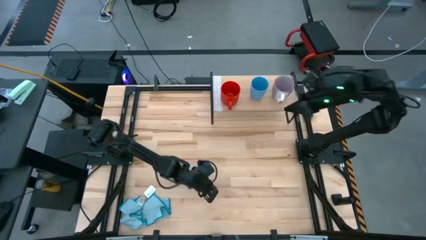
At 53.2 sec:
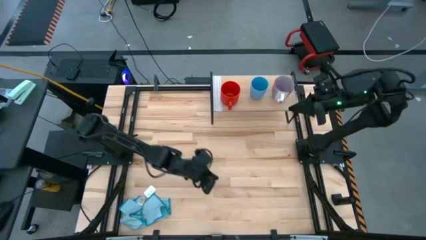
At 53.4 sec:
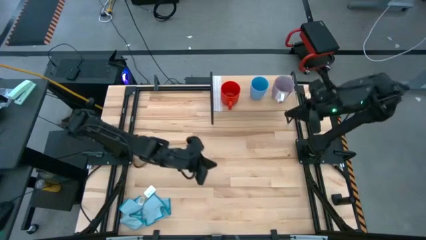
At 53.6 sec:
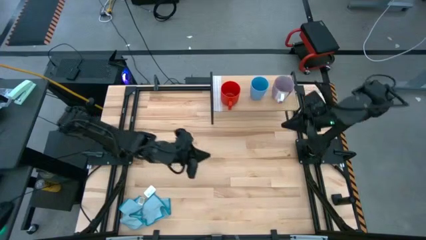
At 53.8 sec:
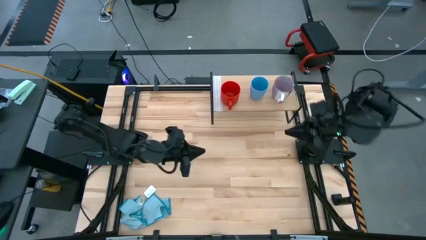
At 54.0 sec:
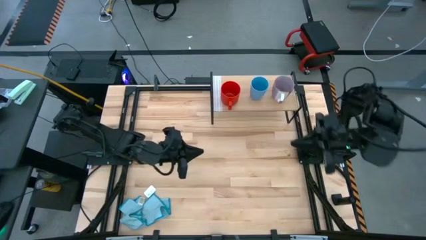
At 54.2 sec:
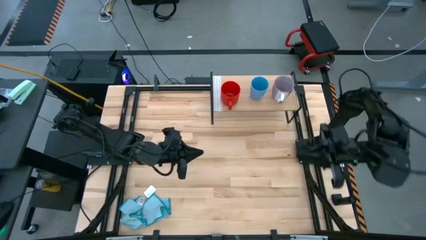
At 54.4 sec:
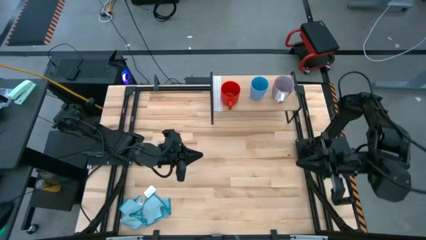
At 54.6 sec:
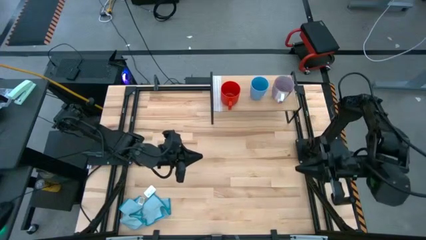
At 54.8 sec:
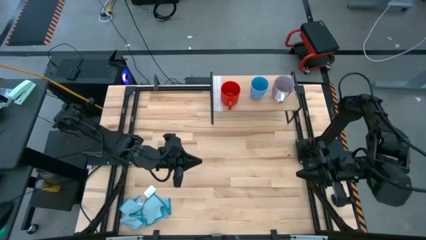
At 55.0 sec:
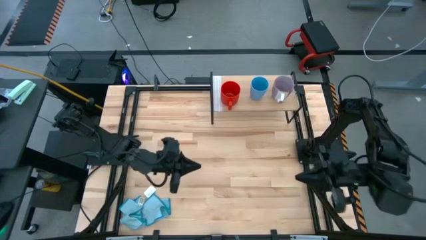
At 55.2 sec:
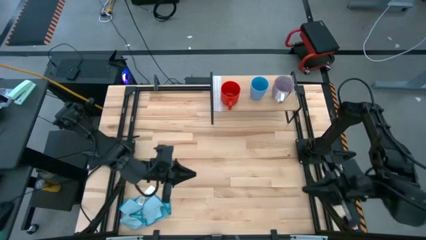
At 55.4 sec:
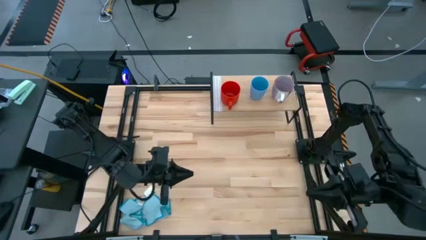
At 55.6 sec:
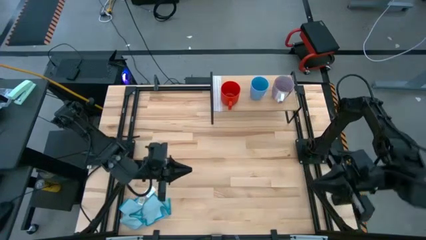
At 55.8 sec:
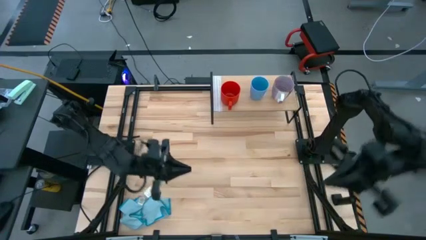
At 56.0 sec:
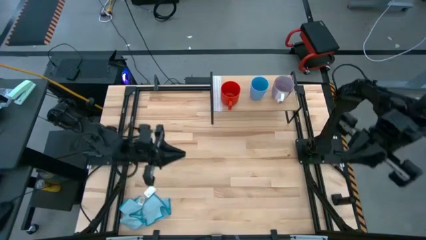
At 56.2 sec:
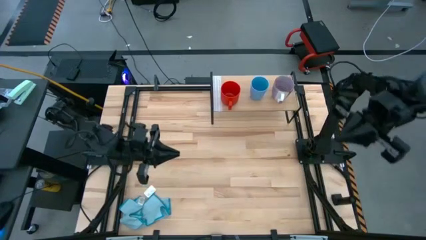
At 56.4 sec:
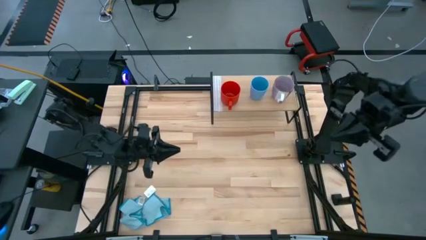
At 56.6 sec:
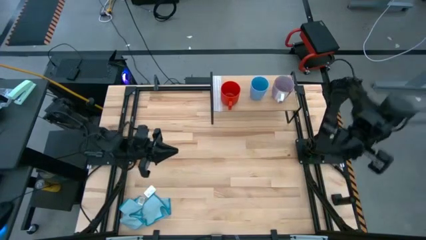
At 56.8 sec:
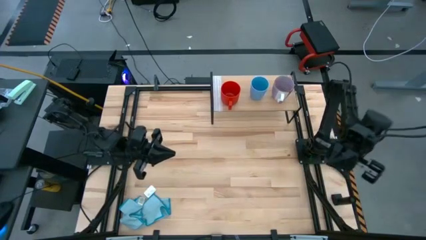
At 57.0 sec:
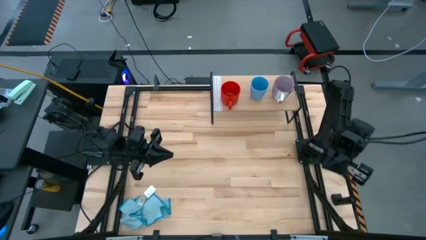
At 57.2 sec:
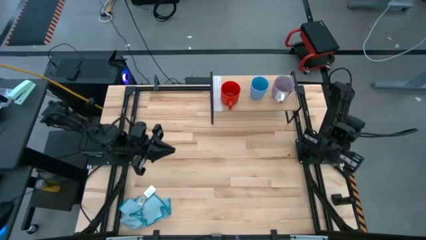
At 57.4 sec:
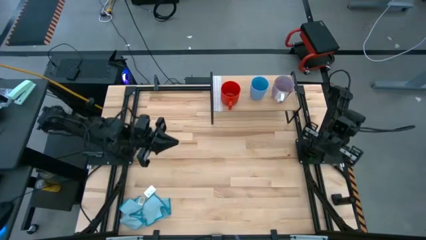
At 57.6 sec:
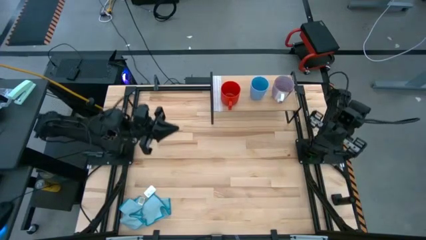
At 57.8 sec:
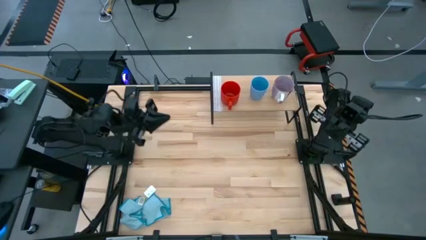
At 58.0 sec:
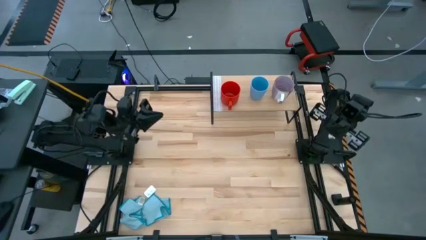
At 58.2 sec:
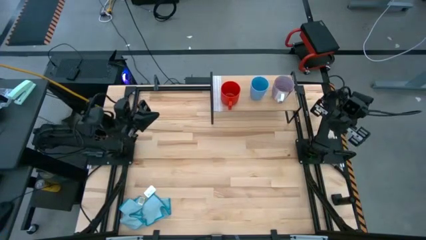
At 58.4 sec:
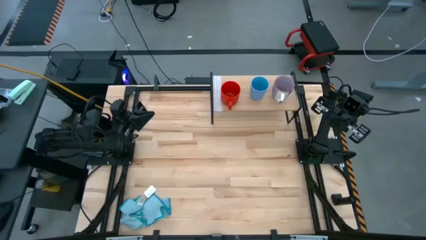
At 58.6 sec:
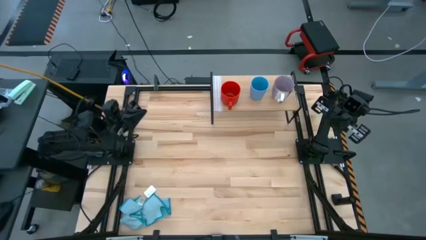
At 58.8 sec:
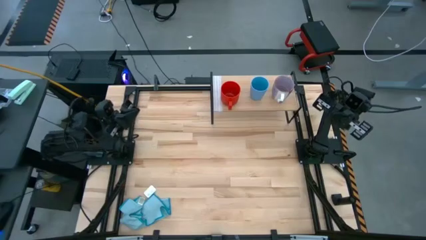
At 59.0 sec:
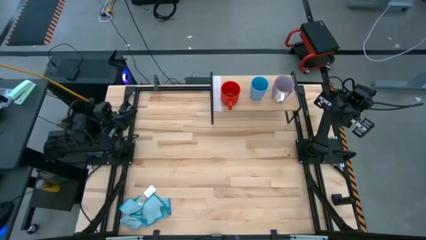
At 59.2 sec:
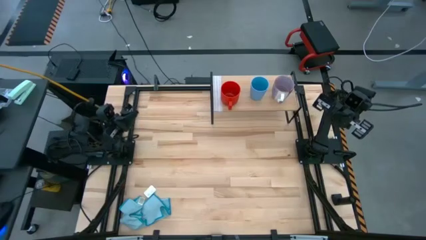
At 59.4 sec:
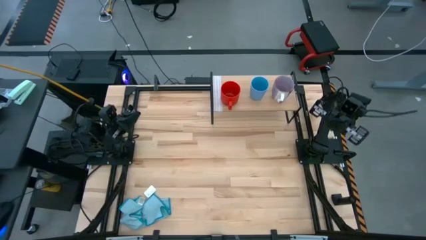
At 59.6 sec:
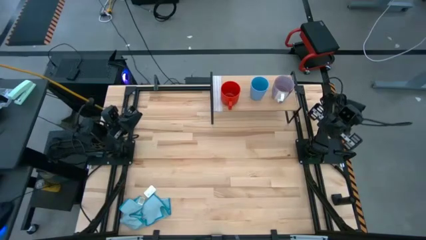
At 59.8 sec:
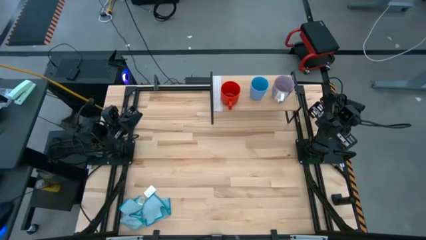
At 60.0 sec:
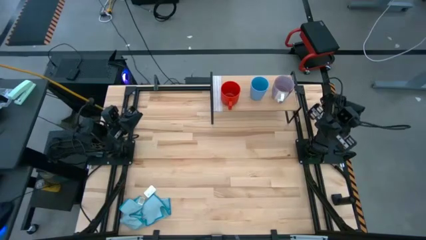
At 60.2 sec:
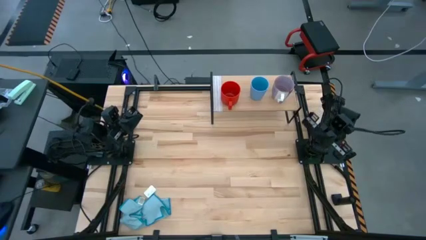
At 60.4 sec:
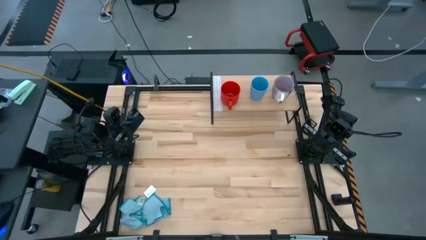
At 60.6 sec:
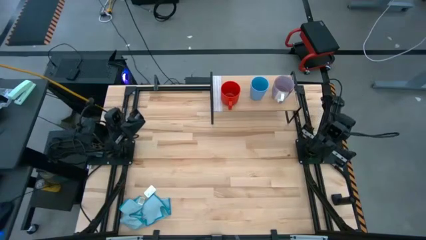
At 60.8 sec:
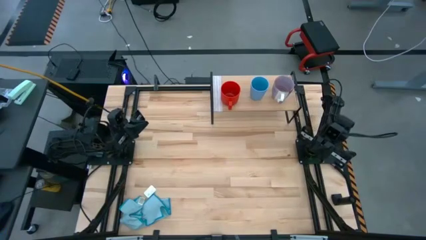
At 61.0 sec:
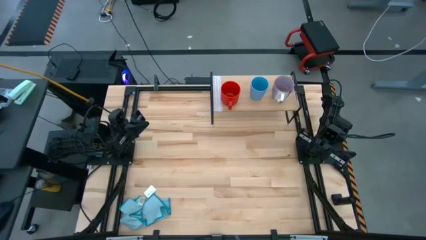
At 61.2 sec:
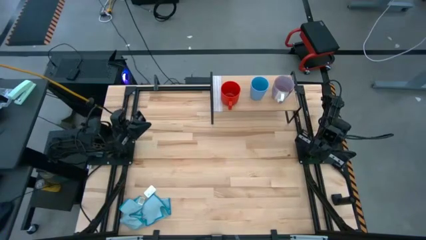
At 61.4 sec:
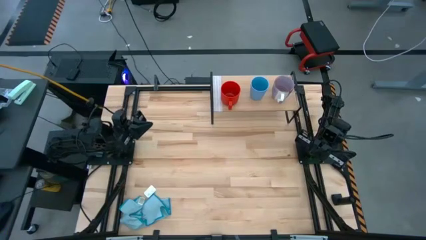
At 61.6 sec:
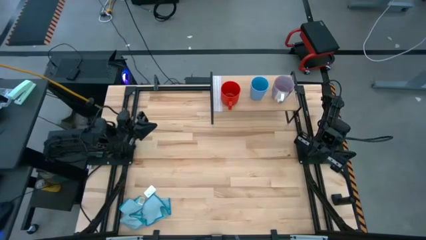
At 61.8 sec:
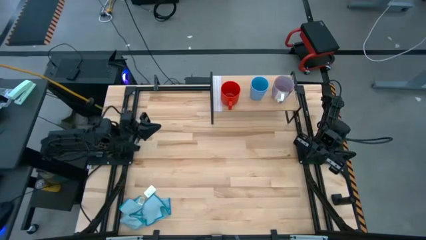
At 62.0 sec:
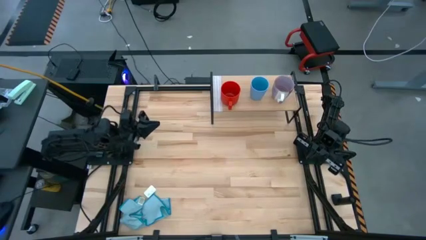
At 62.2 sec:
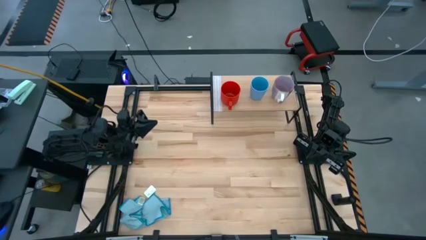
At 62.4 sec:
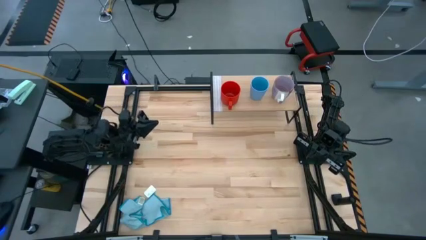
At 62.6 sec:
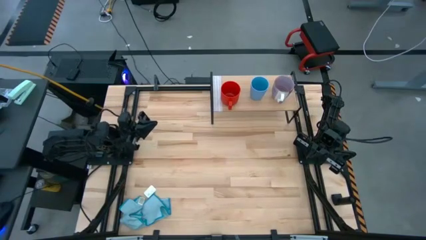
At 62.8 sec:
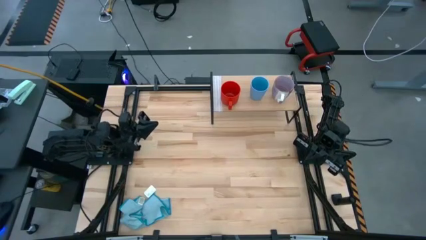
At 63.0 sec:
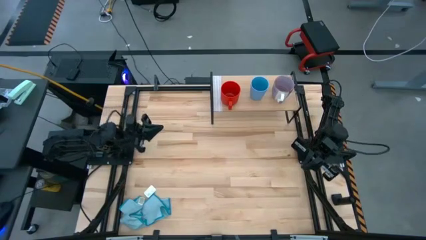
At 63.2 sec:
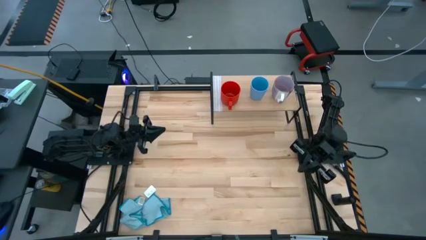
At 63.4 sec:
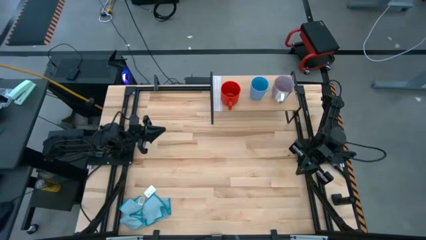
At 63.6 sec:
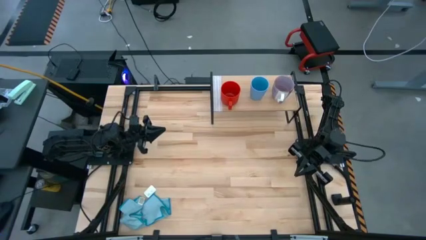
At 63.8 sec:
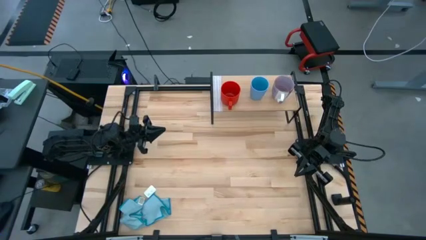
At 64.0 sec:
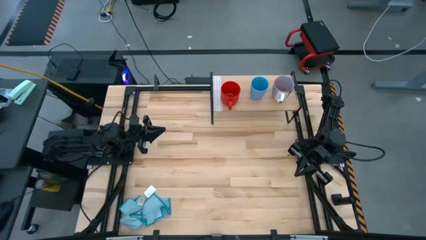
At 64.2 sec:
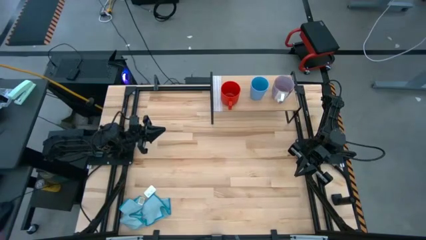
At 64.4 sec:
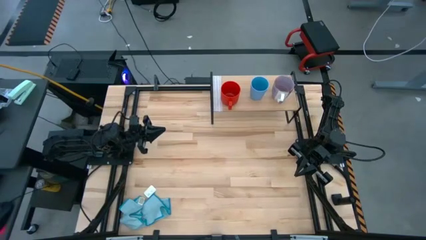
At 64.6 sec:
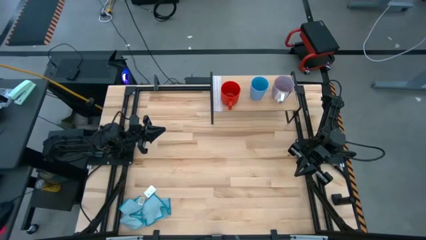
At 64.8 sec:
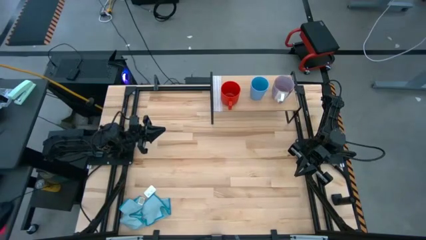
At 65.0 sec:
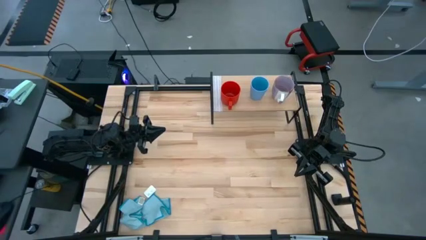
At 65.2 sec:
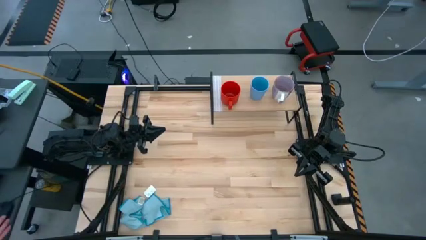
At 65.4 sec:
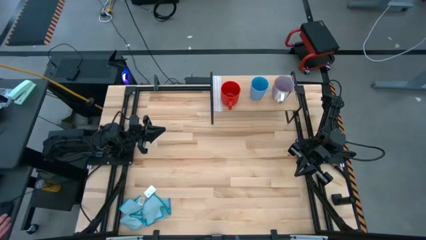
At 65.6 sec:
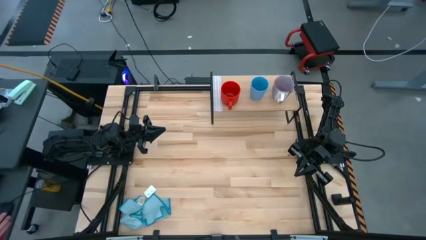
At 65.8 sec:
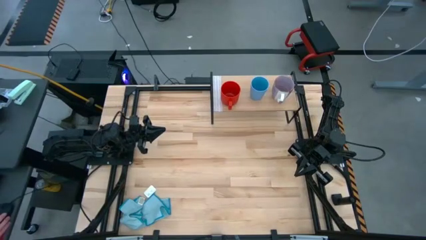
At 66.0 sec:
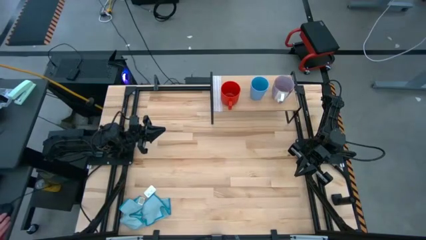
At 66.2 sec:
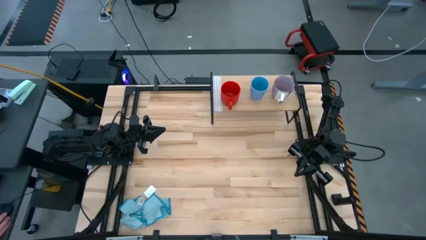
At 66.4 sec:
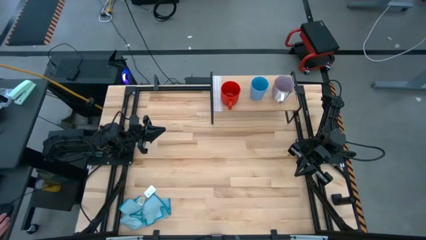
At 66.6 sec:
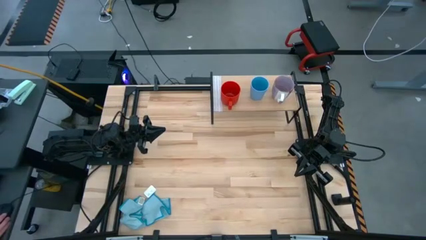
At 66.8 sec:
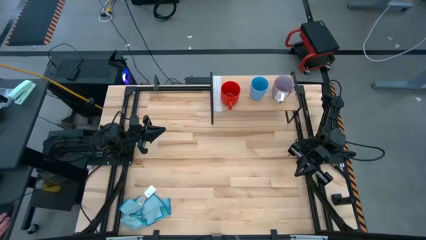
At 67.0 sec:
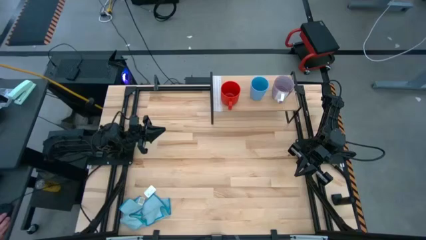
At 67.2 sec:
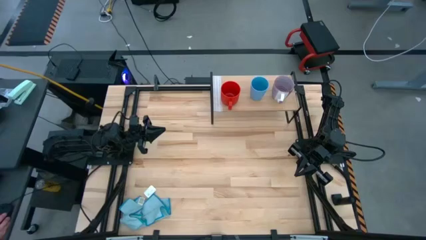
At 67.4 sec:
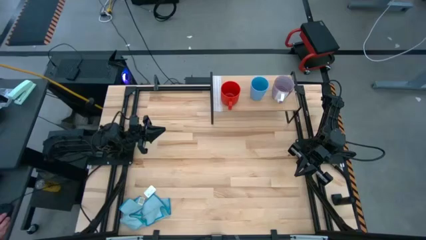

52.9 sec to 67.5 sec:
Task: Stack small to large cups/mugs on shelf
Return to Home Position
